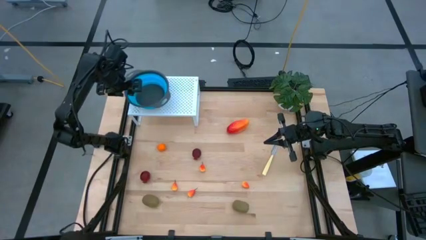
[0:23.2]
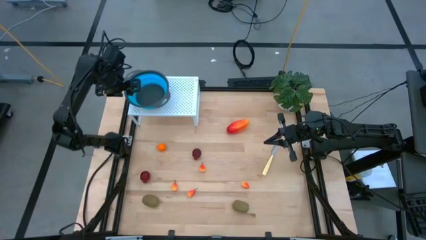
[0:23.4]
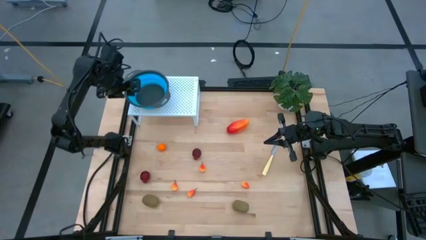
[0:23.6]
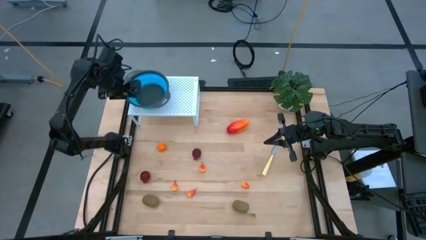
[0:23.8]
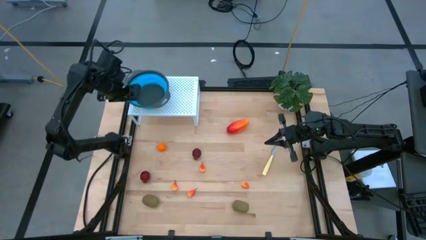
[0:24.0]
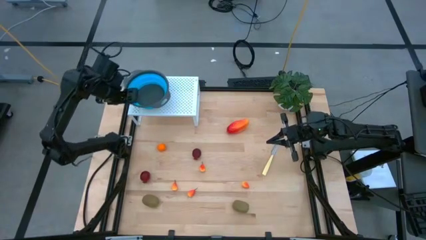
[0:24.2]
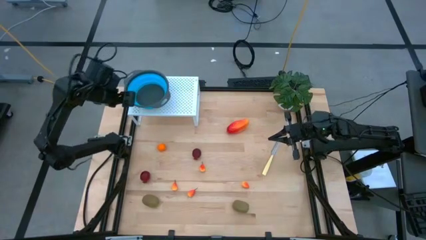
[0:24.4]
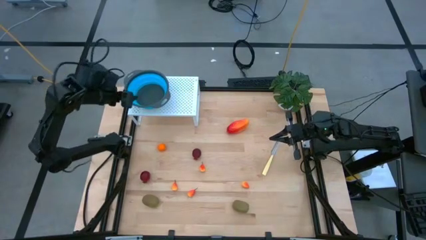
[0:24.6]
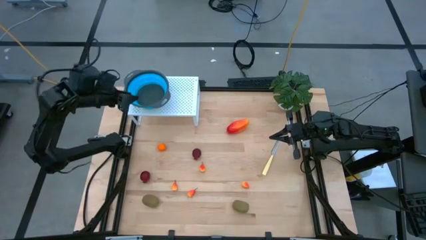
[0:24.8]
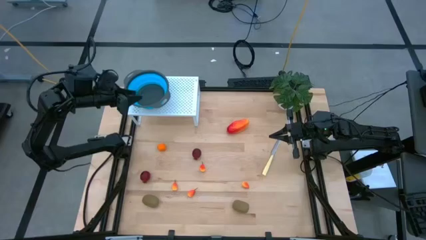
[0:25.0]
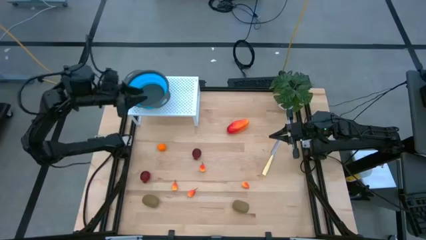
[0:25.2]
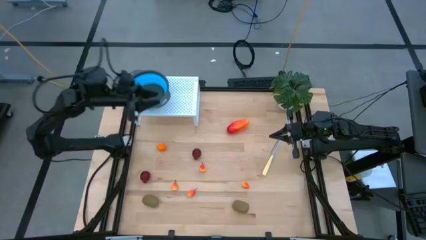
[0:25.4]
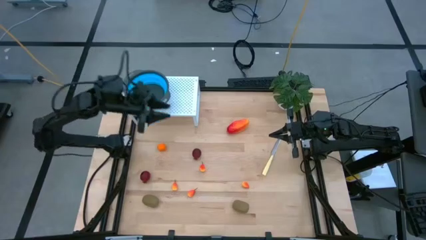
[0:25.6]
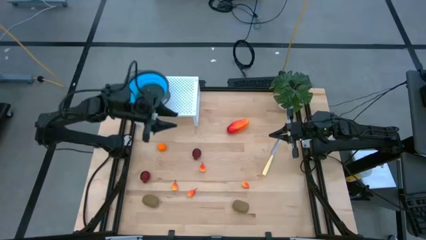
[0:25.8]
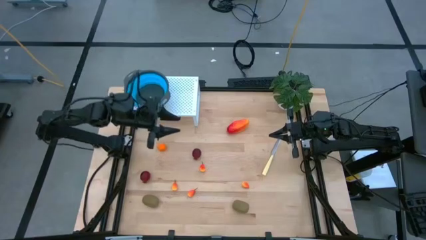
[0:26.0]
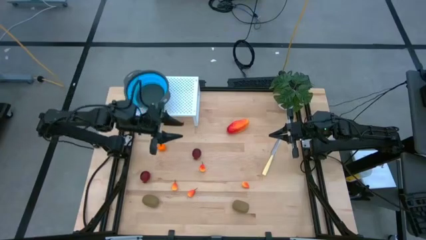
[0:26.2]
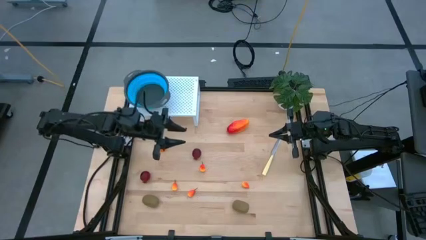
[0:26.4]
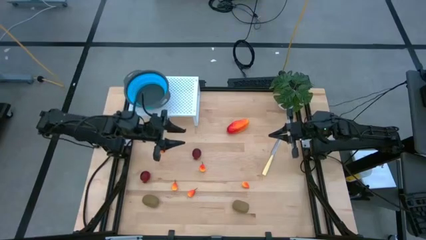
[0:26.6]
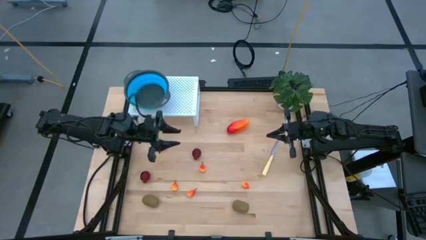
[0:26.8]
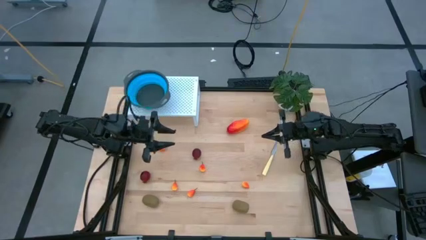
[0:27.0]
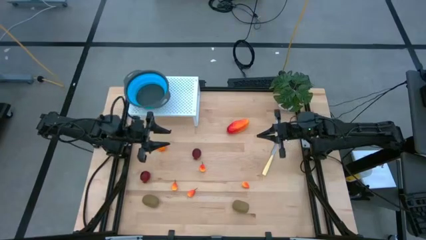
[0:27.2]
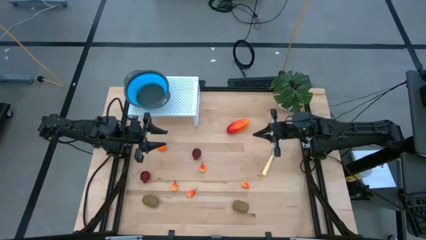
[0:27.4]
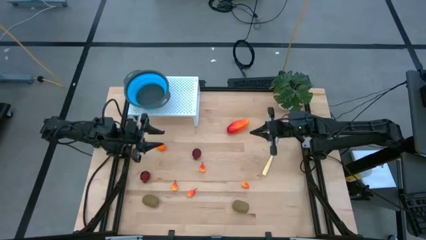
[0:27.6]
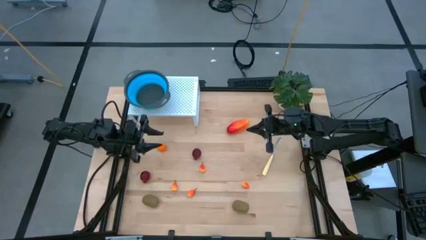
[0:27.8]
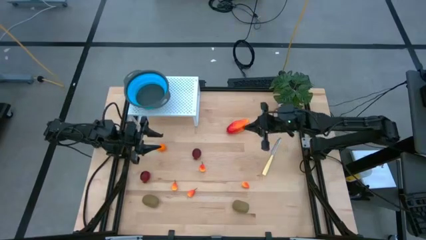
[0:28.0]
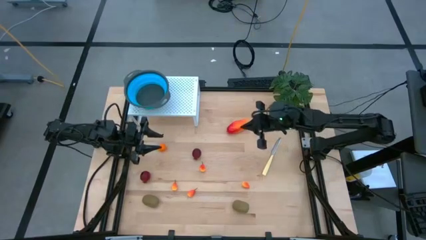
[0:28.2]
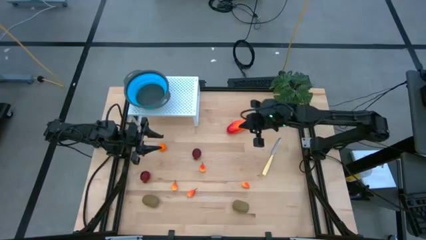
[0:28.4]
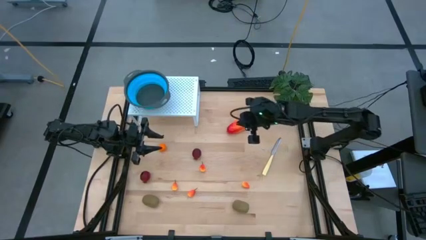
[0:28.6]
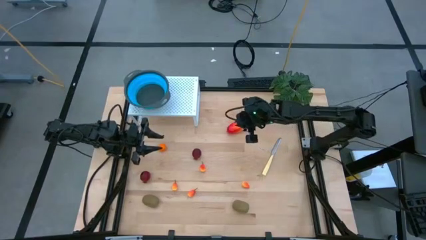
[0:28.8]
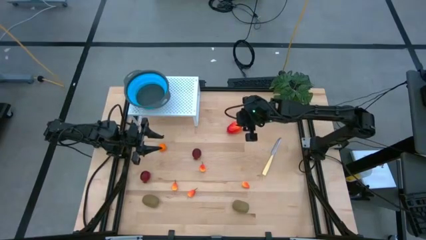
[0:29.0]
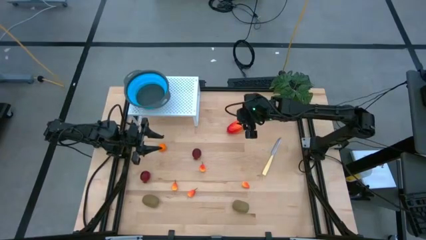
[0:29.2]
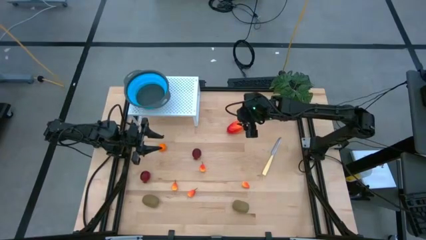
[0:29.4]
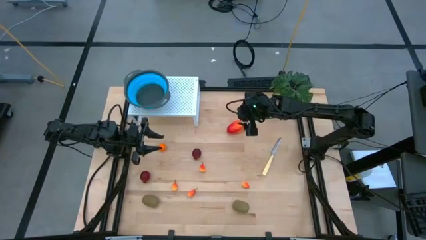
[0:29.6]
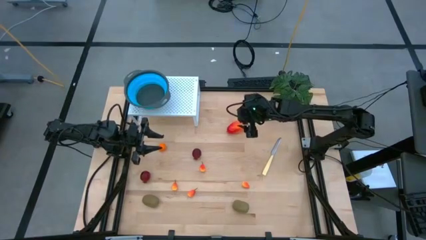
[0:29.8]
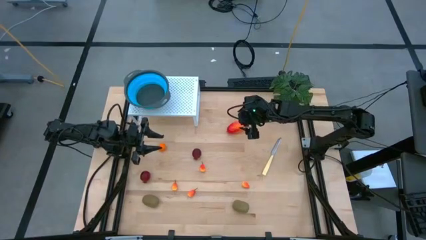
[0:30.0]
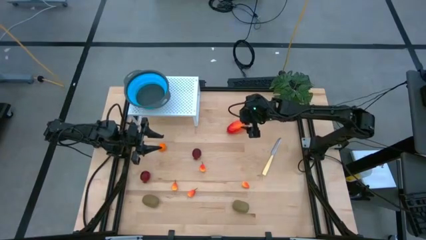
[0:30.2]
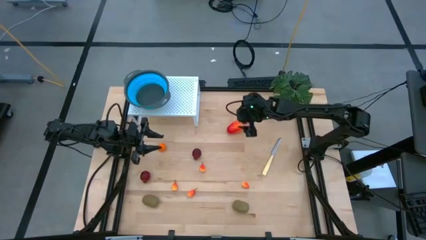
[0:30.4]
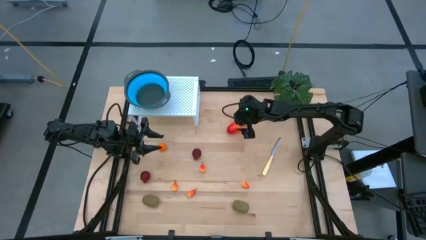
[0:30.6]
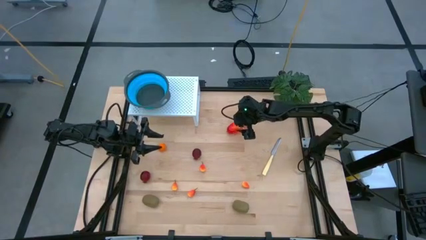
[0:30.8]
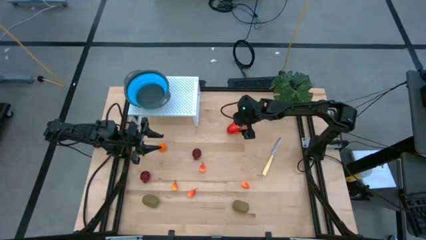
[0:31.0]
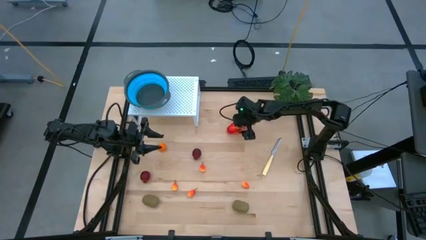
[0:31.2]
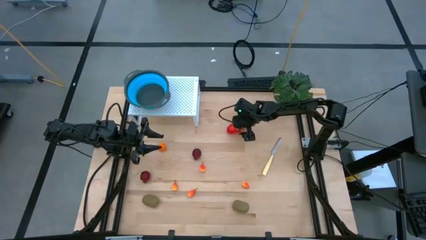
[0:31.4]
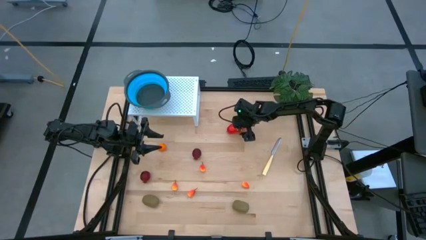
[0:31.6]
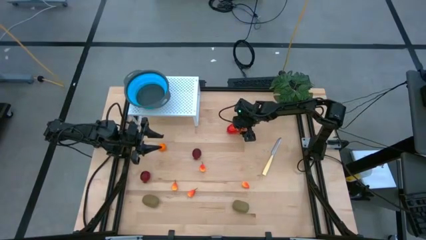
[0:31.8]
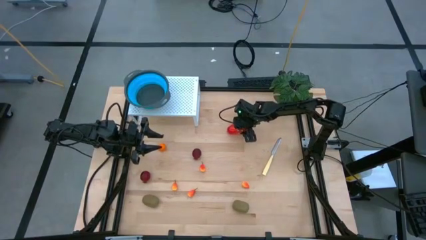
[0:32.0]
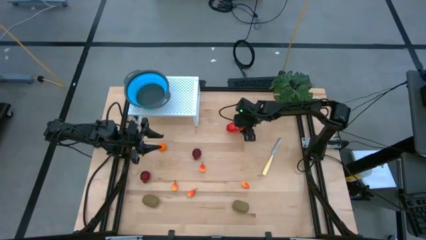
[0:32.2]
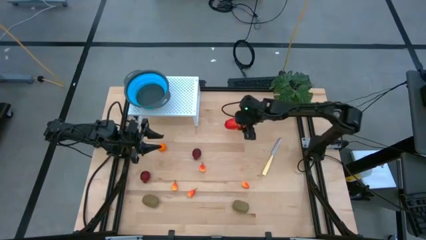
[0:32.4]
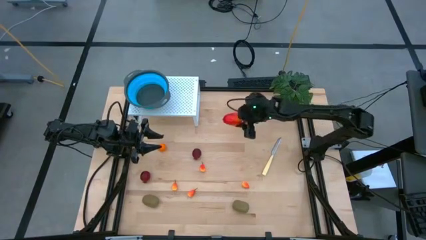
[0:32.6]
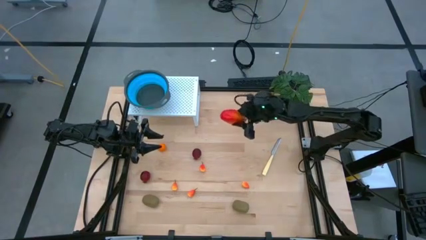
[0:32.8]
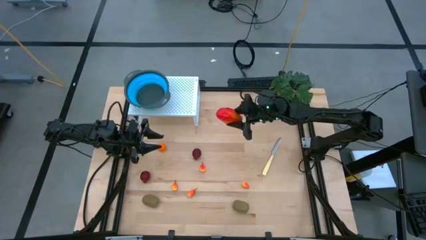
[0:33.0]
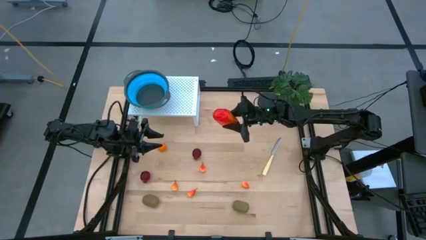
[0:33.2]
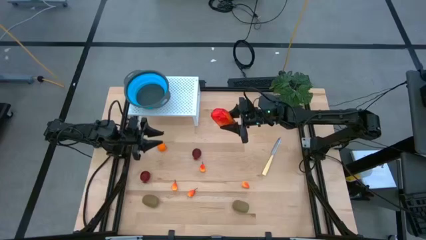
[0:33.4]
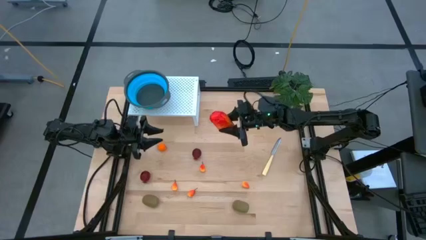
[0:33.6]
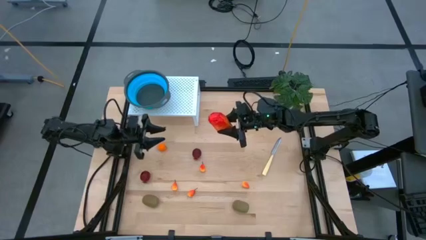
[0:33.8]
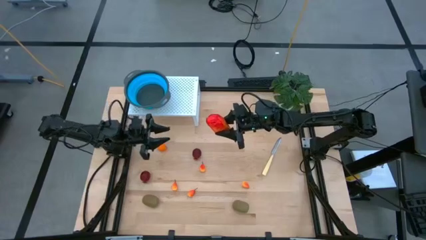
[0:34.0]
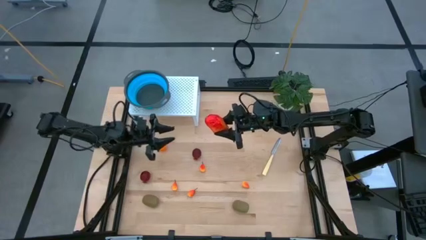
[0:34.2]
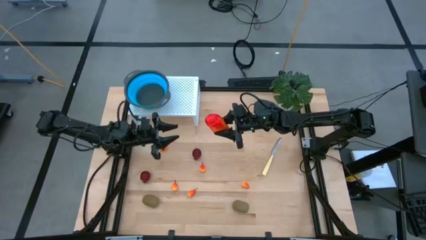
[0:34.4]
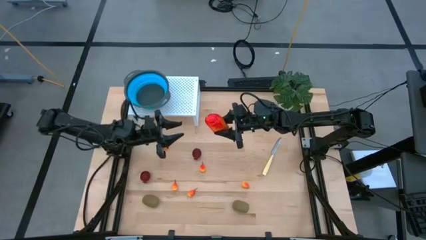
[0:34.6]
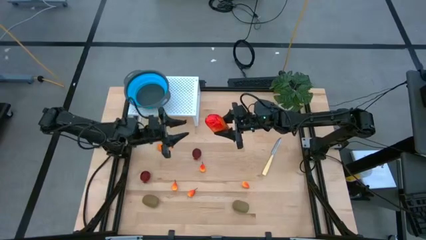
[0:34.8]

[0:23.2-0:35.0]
Task: Pick & Place Fruit
Put the mango into the blue strainer bowl on the shelf

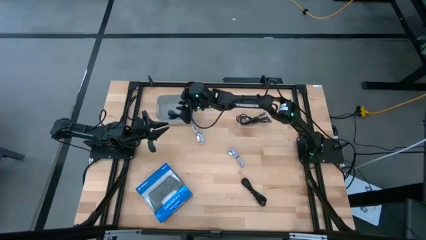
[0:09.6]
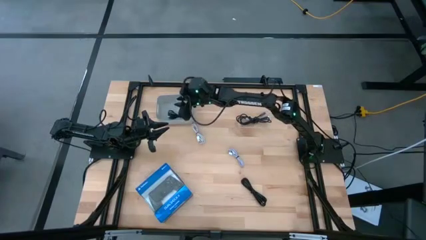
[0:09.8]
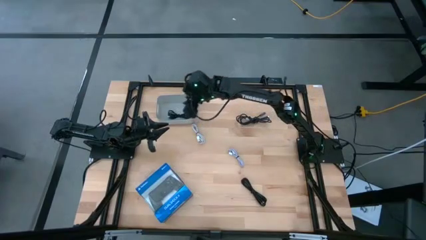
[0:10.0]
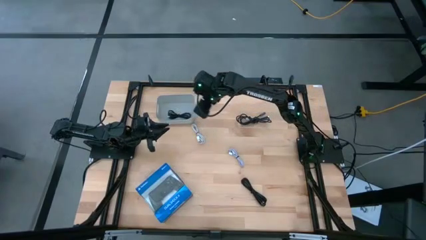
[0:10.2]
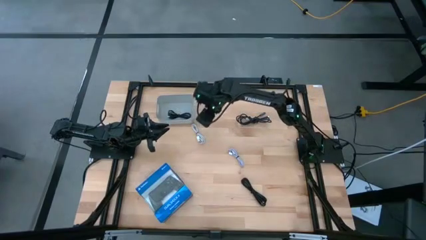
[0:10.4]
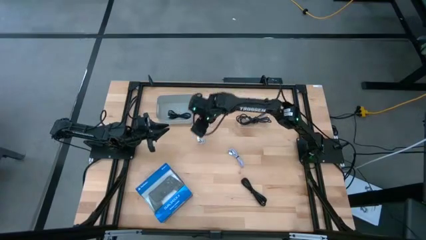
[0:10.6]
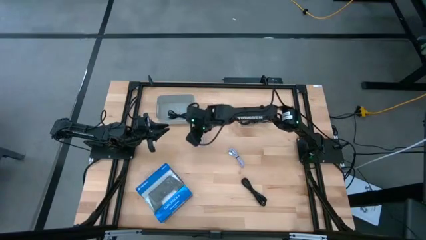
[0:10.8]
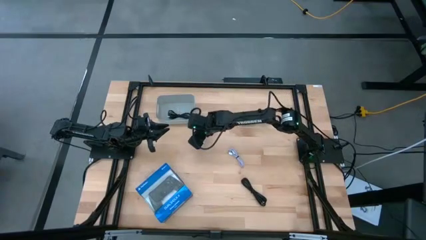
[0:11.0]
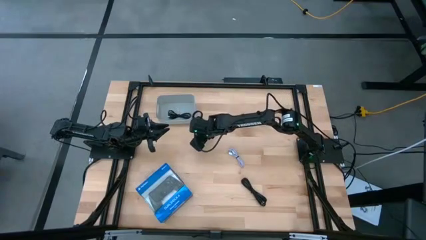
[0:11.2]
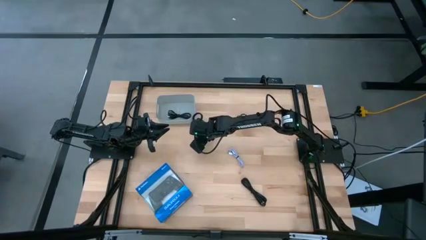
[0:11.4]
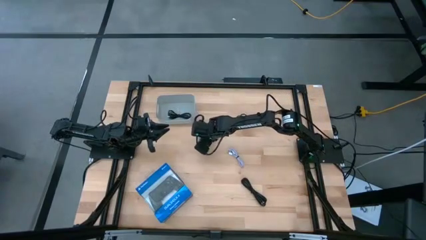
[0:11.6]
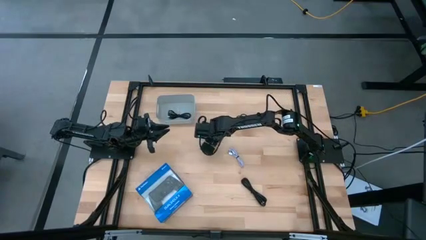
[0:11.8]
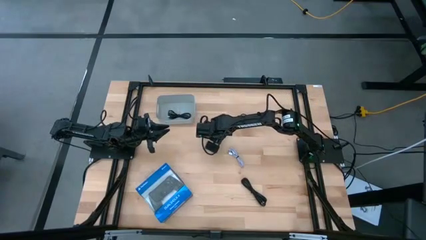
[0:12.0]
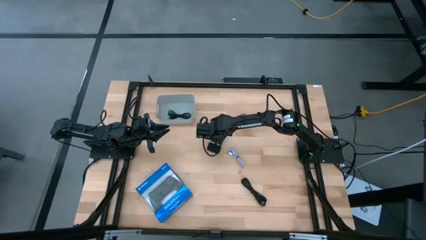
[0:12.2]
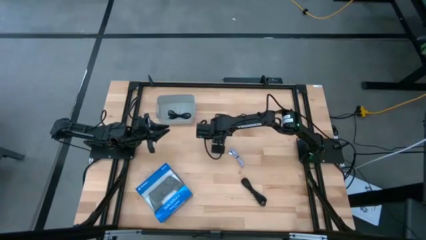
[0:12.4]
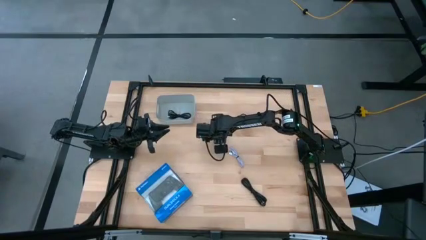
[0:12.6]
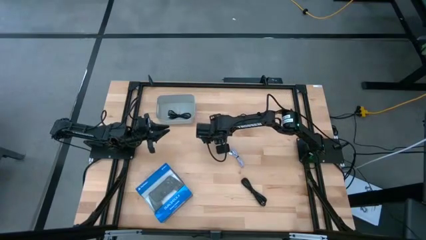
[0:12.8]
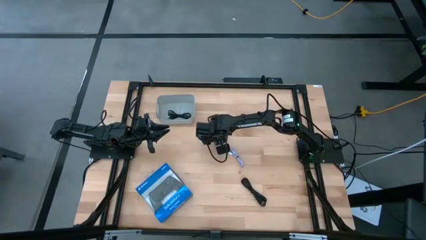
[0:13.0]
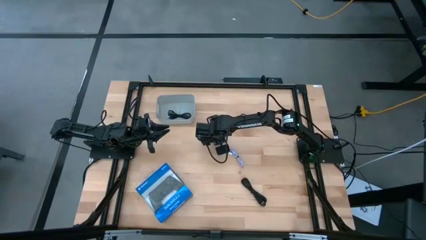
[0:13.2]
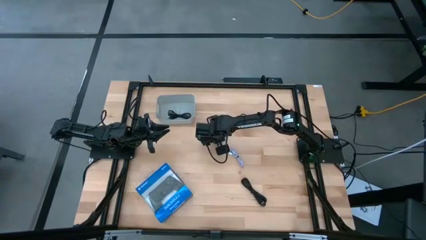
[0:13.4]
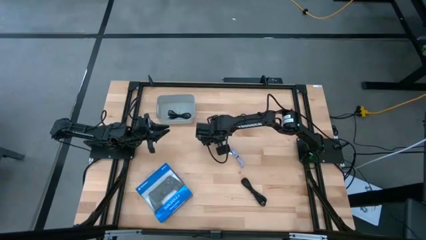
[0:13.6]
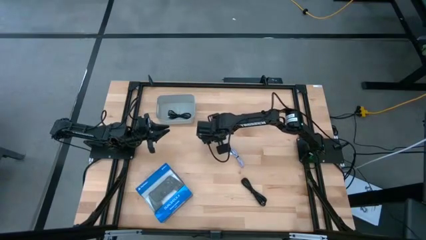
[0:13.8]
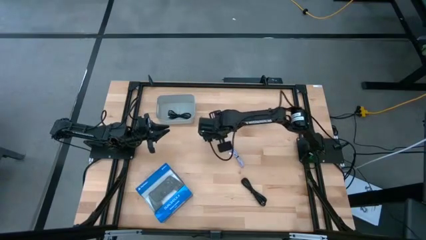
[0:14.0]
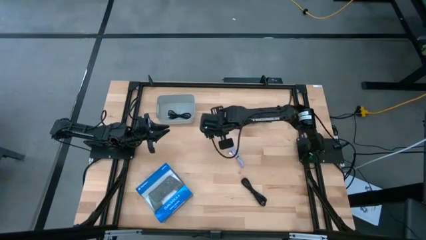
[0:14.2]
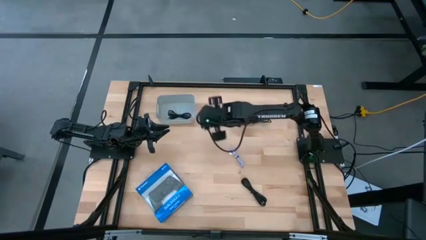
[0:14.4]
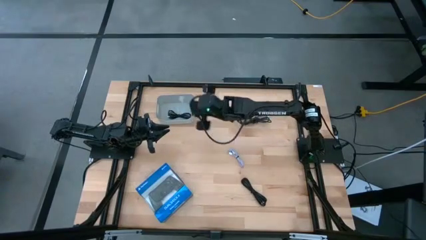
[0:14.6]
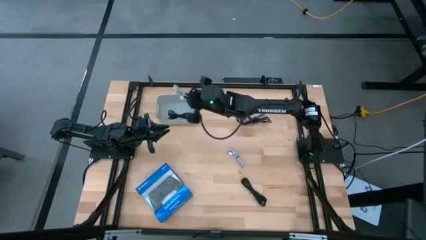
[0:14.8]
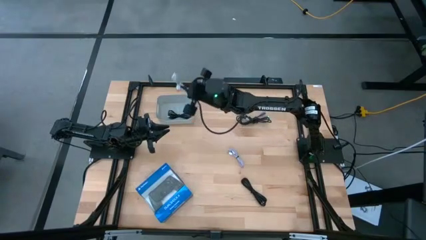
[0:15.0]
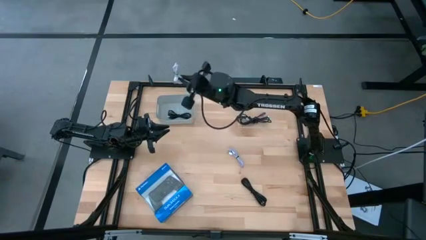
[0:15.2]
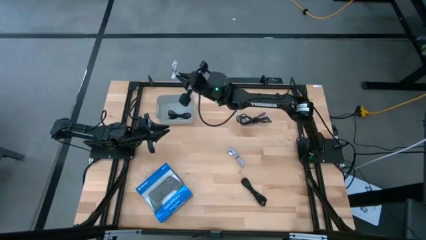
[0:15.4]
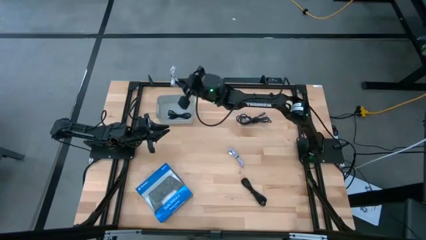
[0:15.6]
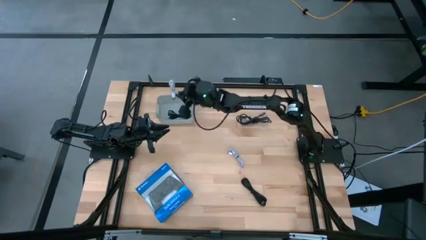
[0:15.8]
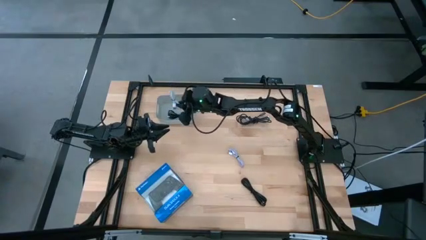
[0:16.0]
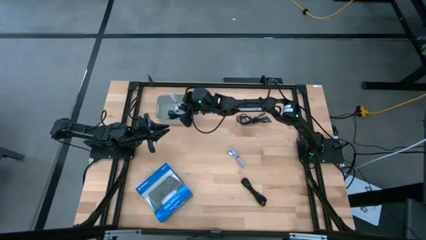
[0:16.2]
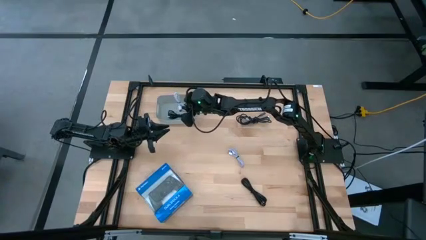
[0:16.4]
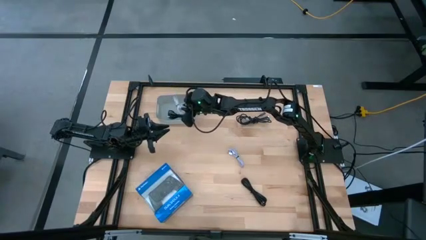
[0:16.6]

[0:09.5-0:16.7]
Task: Pick and place USB-C Cables
Put the white charger cable into the white bin
